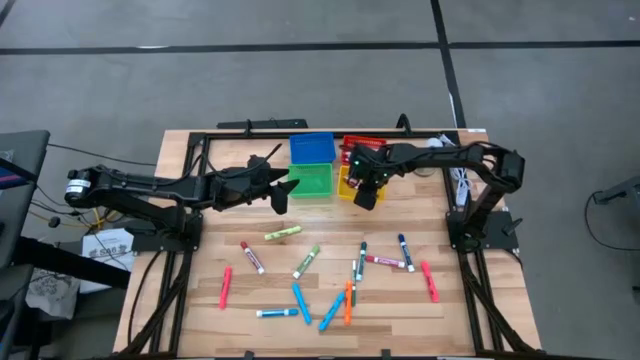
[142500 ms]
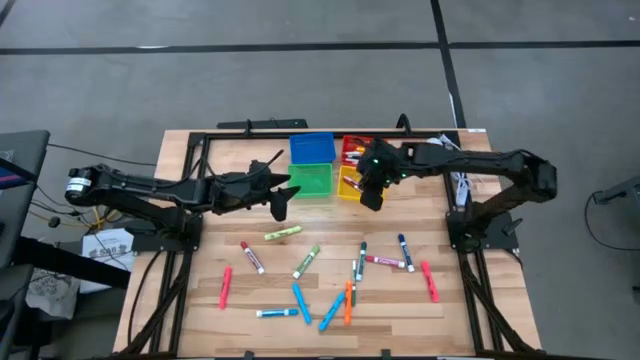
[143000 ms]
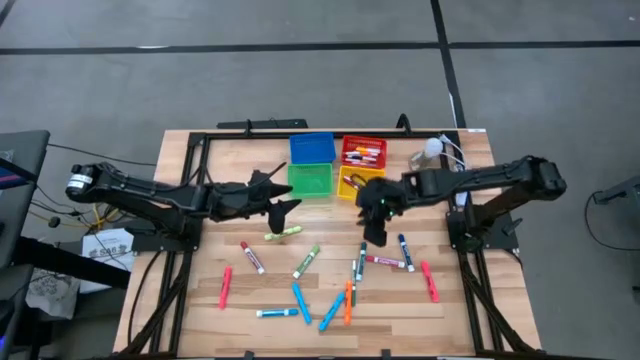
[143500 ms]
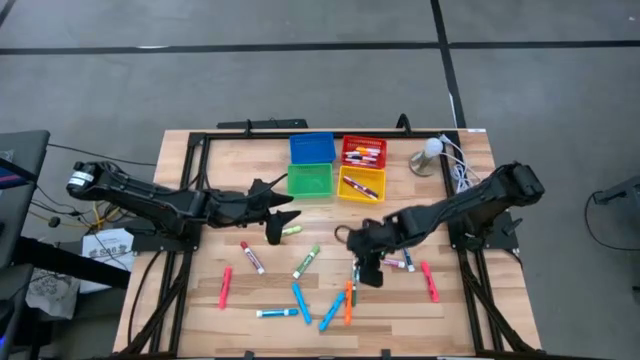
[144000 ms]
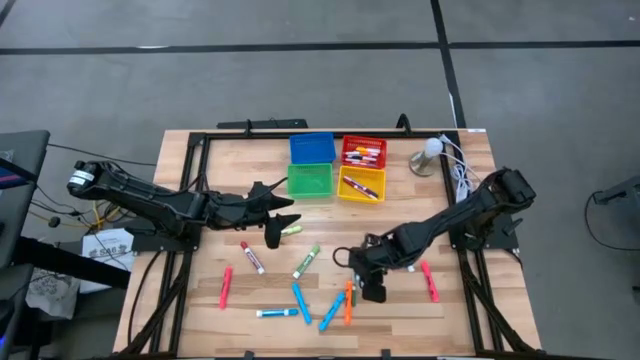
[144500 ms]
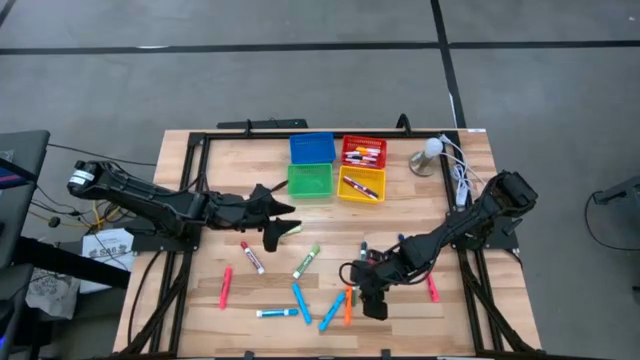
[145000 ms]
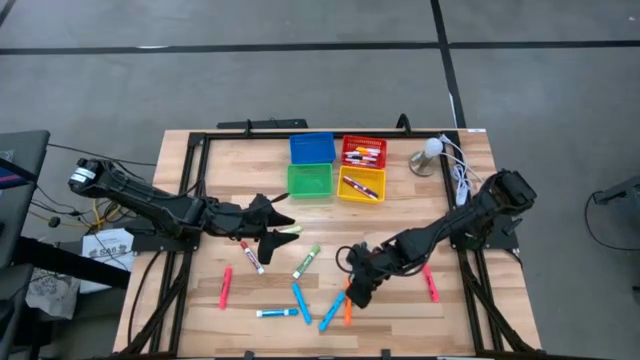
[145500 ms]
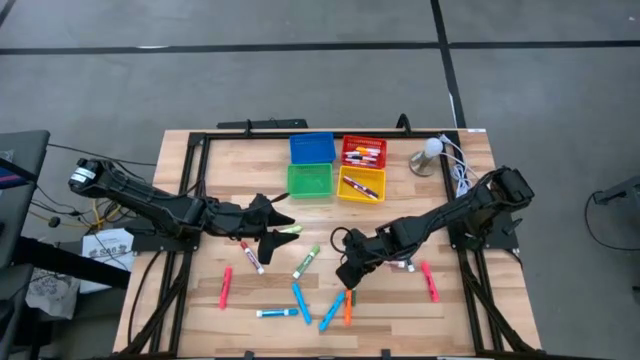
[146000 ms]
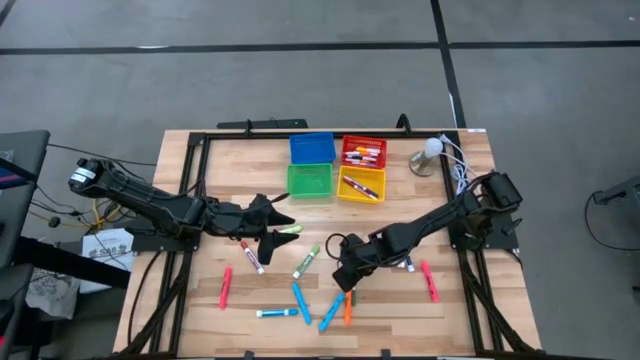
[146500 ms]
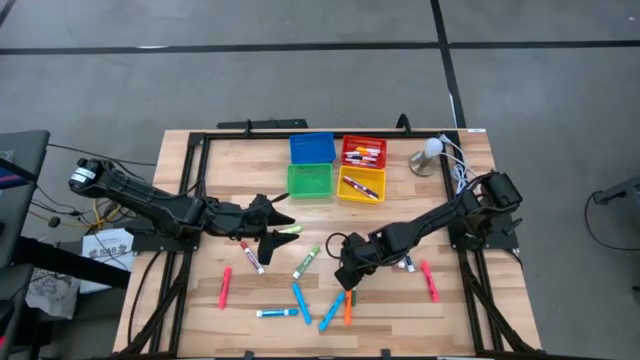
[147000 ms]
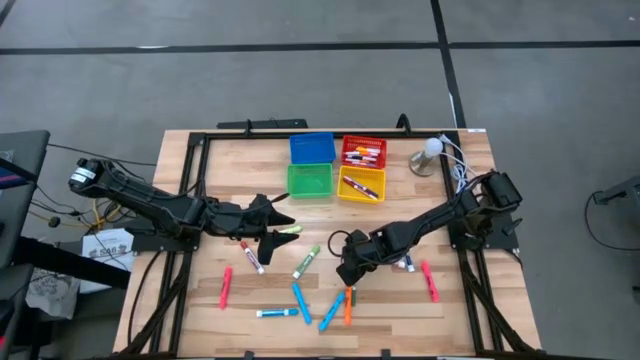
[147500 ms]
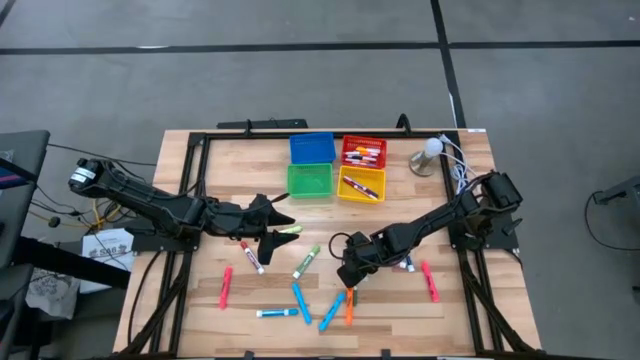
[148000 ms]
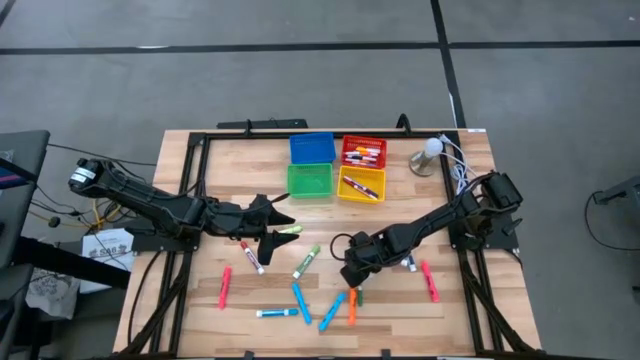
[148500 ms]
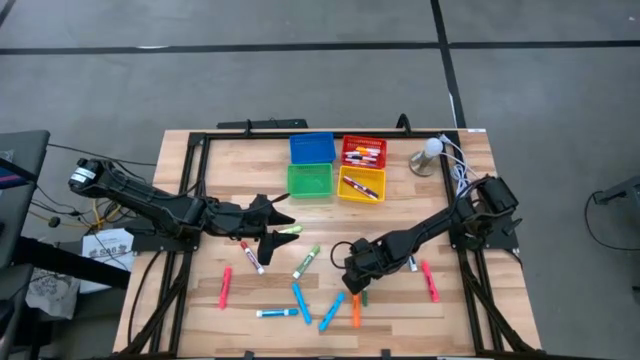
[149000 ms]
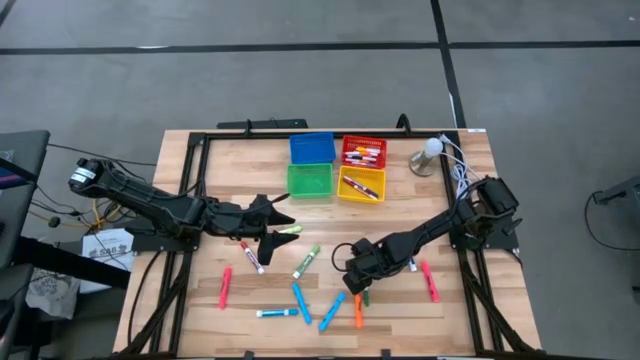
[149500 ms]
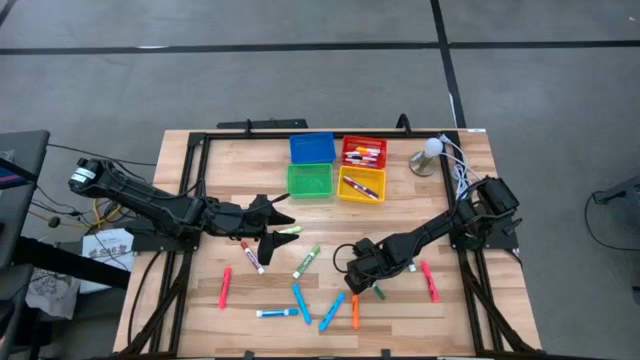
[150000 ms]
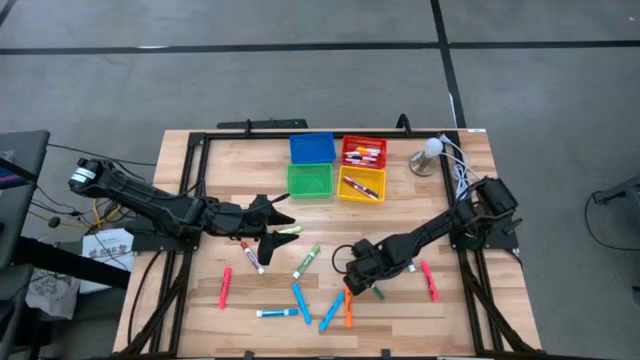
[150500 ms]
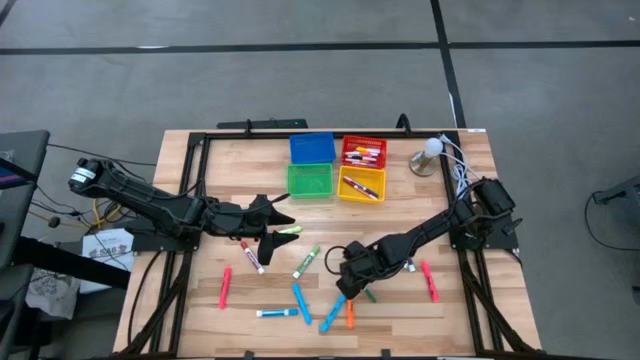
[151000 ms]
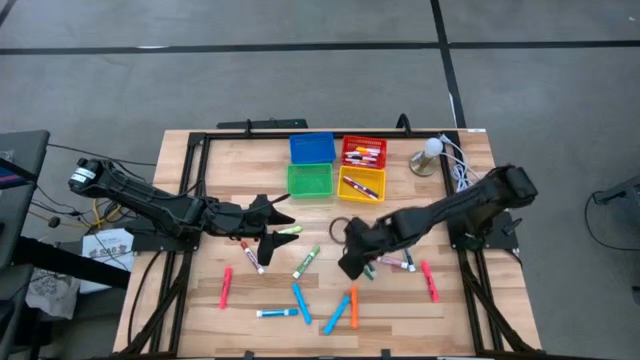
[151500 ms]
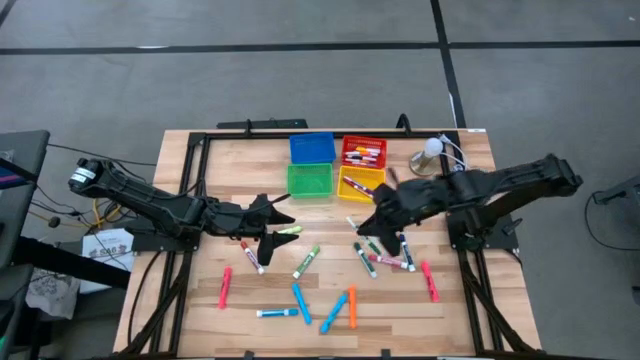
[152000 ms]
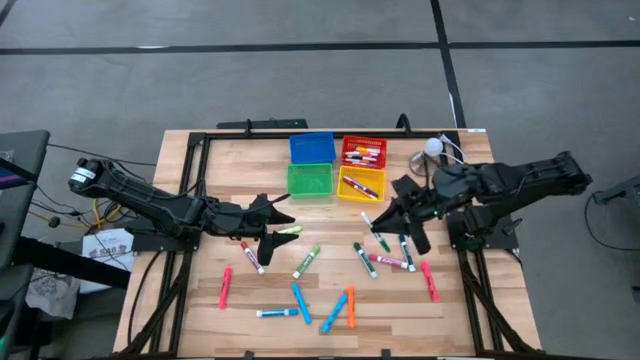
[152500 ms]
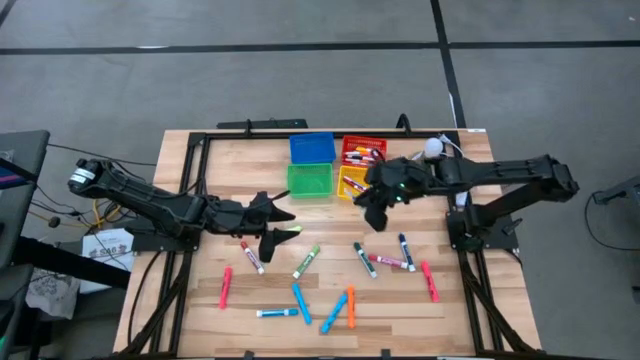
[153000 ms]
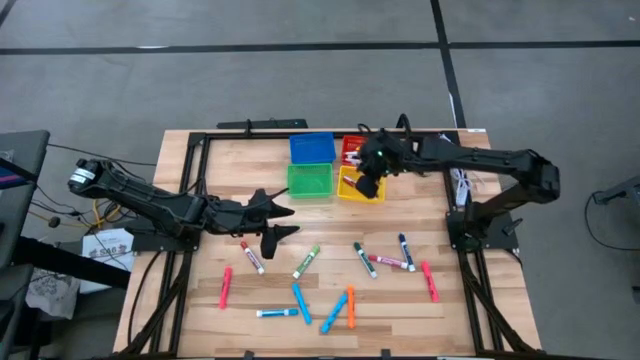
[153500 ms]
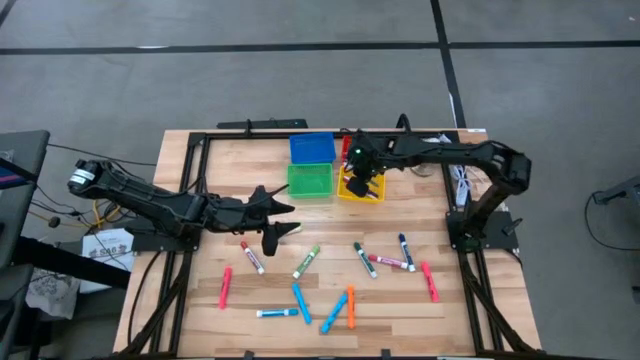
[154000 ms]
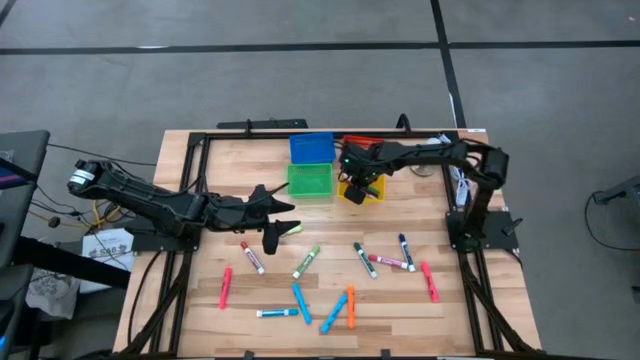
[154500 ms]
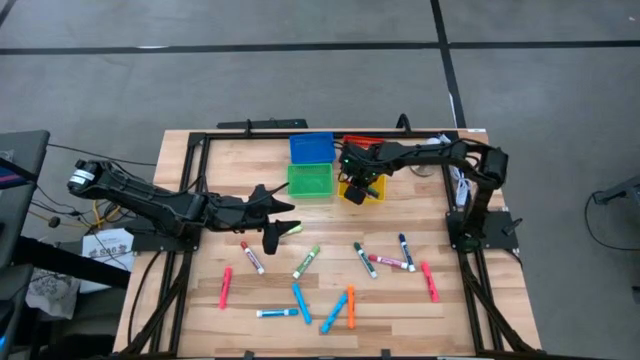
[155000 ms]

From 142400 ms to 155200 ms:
Task: Pick & Place Markers
Put the dark green marker into the yellow bin

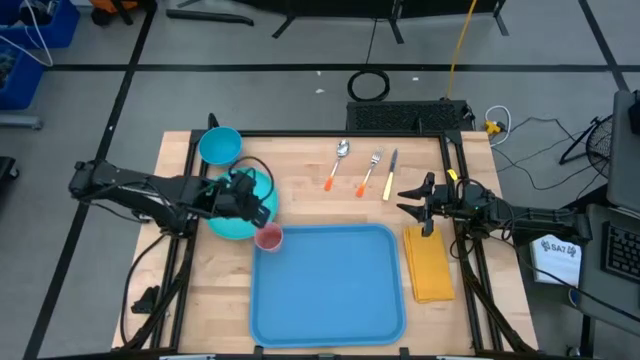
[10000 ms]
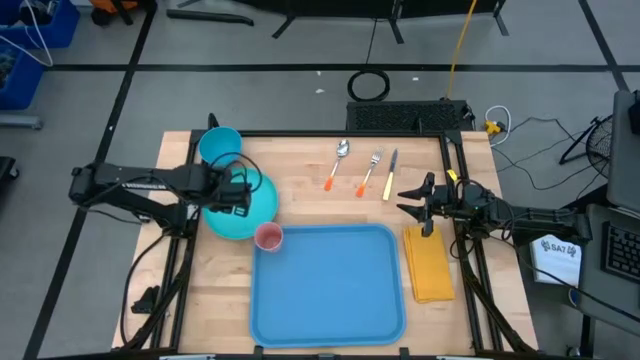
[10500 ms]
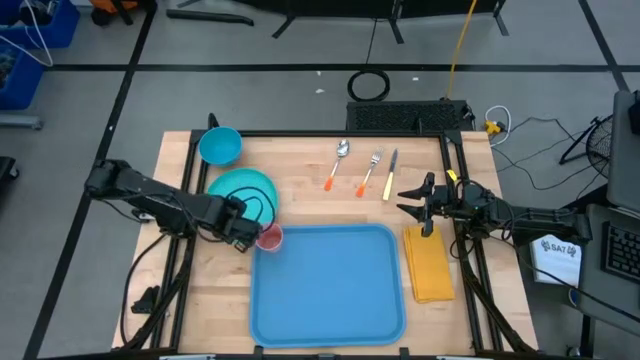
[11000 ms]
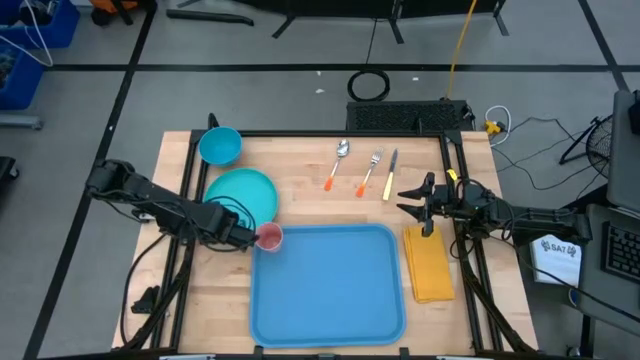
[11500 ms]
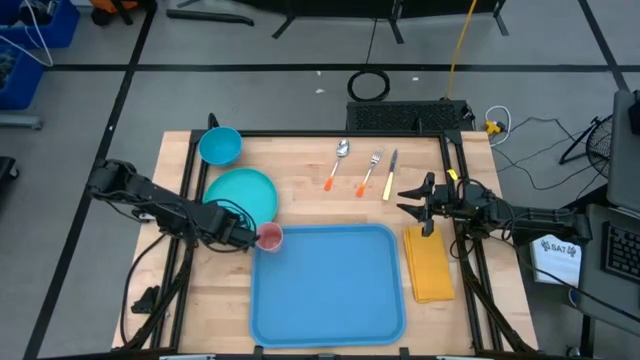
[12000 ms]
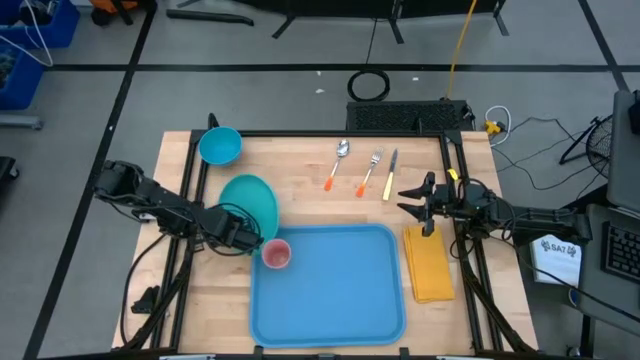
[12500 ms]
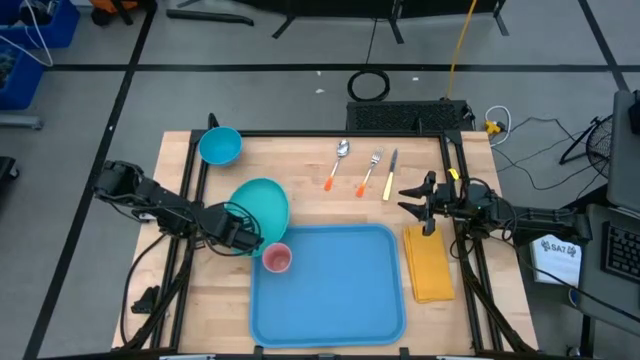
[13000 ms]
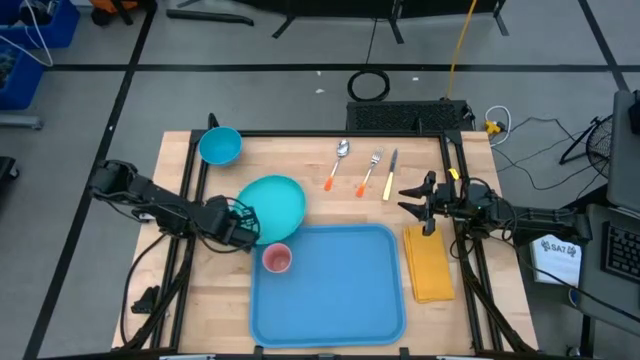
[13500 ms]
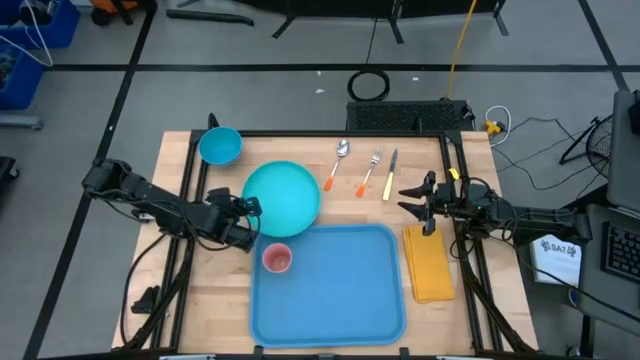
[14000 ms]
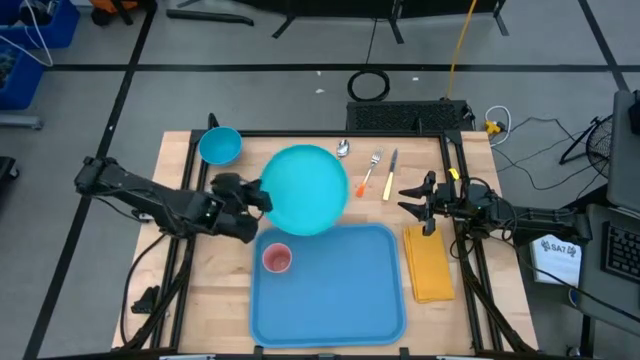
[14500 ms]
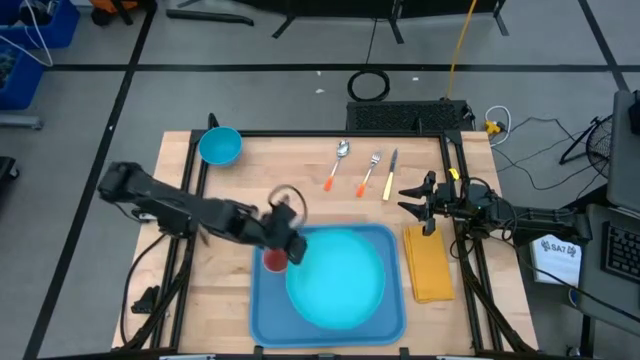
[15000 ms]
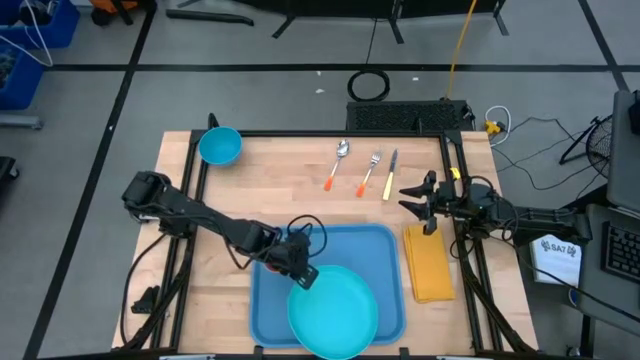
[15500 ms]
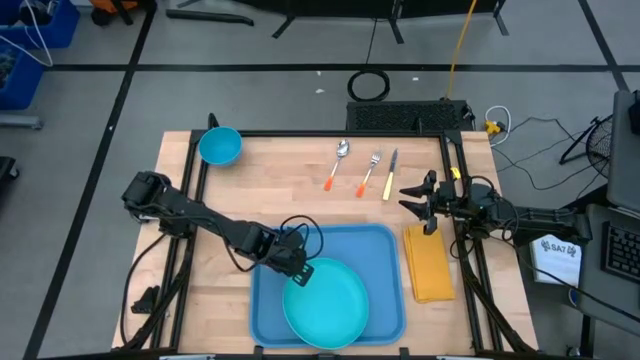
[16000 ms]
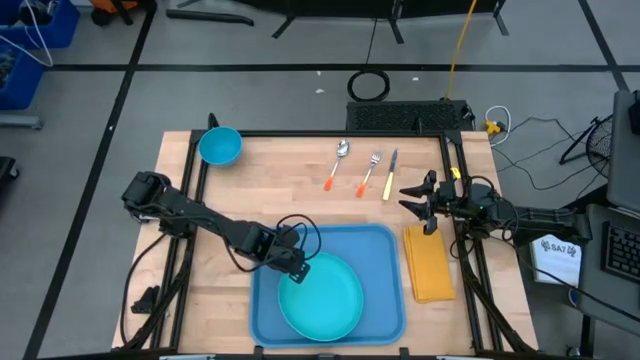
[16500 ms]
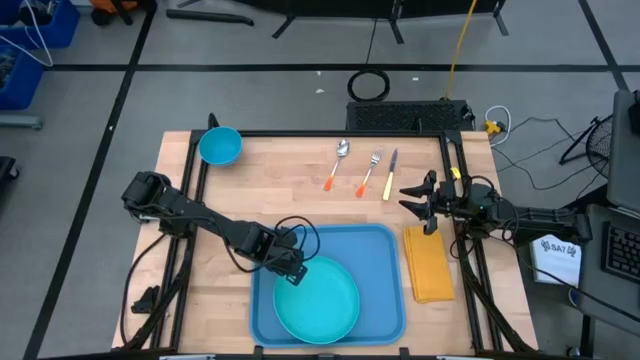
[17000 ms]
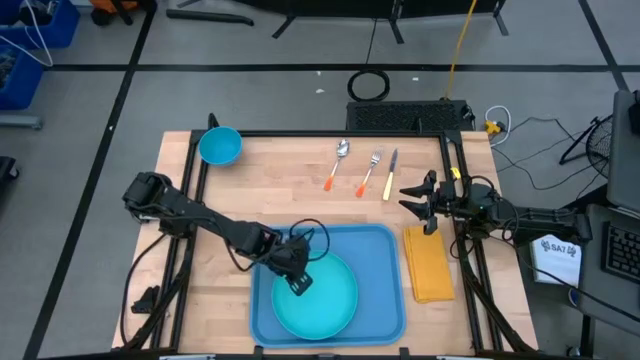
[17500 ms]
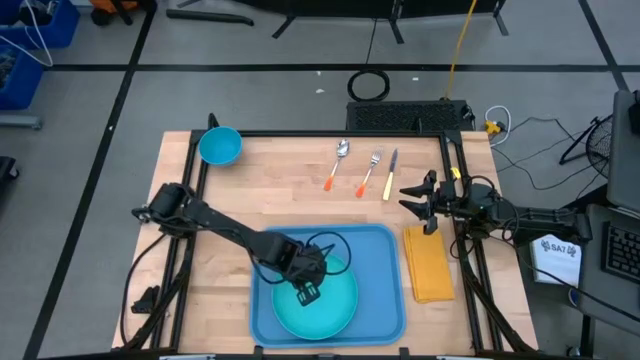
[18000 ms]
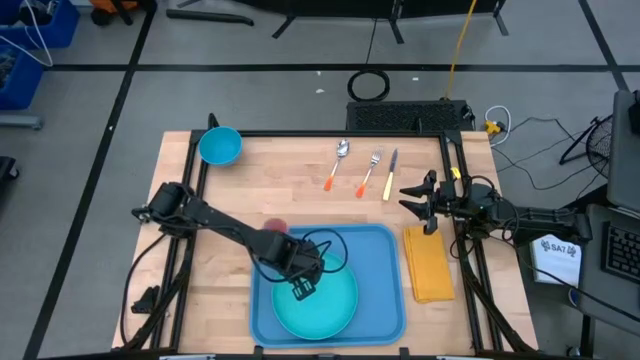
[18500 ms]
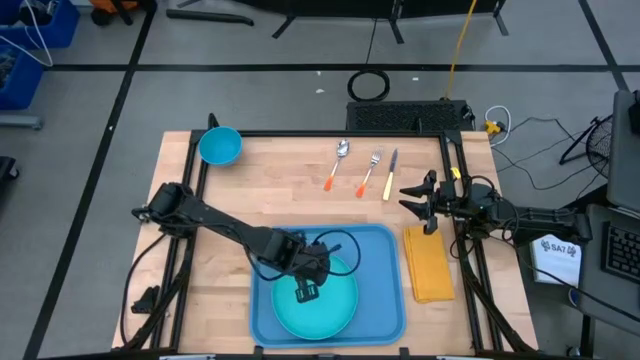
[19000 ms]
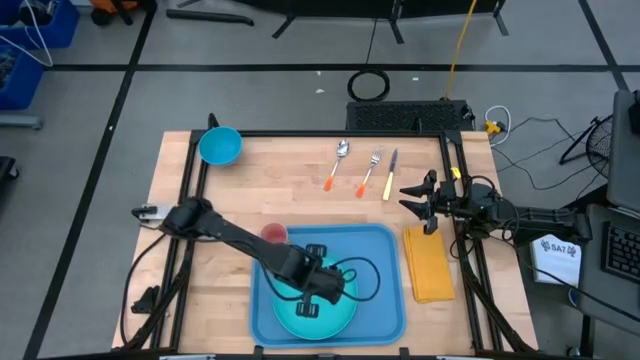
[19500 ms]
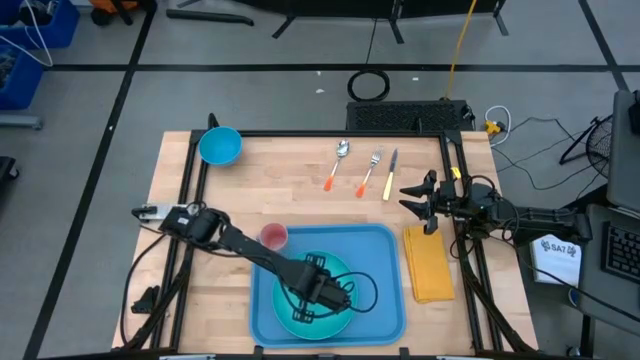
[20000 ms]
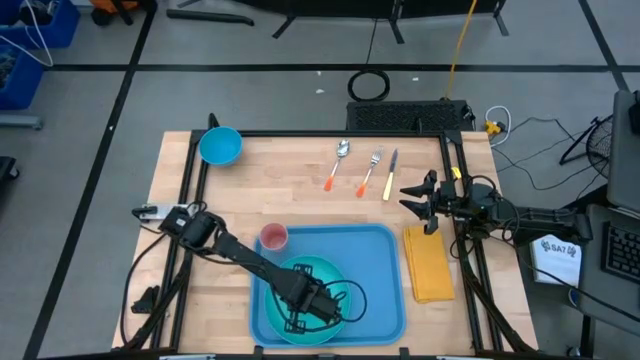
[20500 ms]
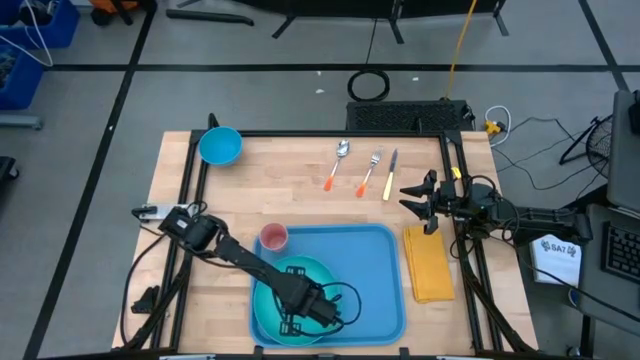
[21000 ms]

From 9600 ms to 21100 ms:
Task: Set up tray
Put the blue plate on the blue tray at the bottom of the pink cup
